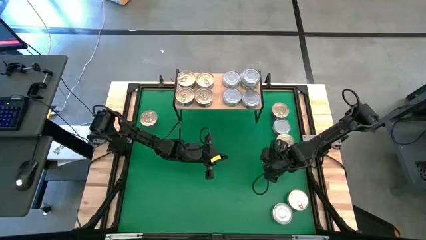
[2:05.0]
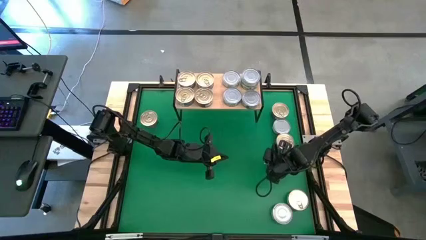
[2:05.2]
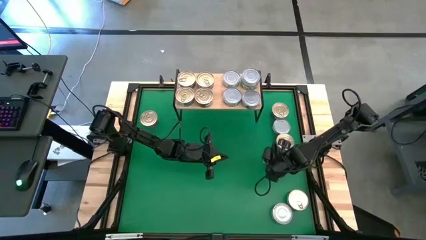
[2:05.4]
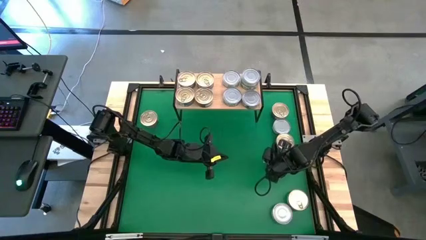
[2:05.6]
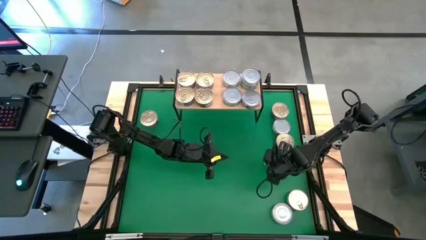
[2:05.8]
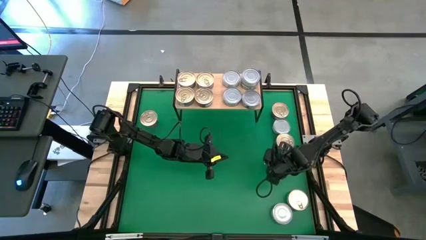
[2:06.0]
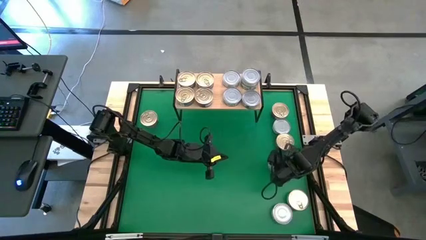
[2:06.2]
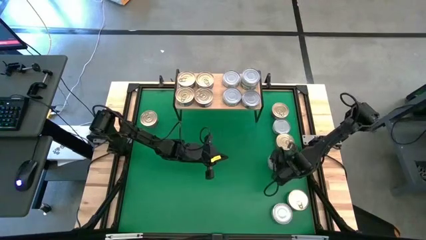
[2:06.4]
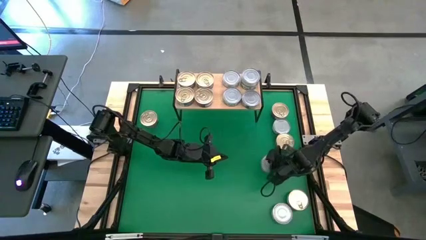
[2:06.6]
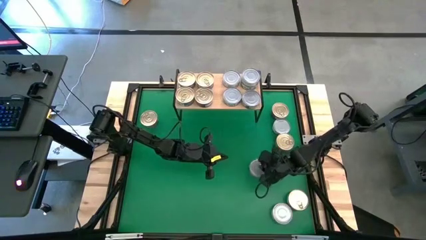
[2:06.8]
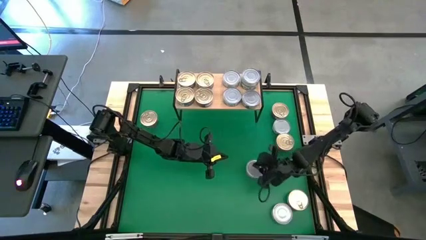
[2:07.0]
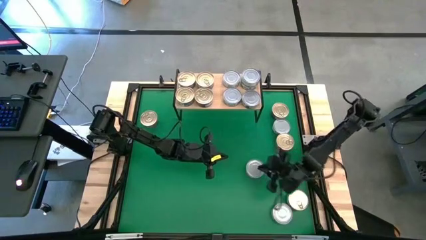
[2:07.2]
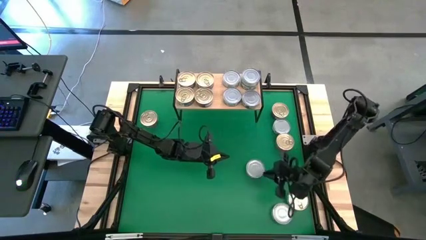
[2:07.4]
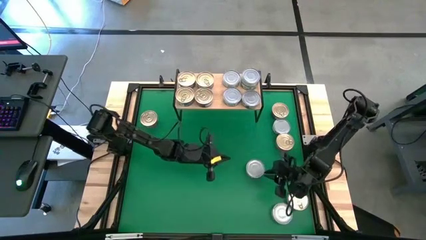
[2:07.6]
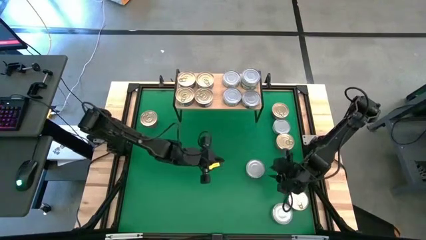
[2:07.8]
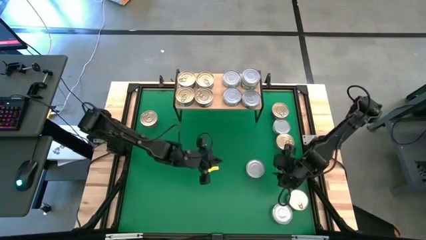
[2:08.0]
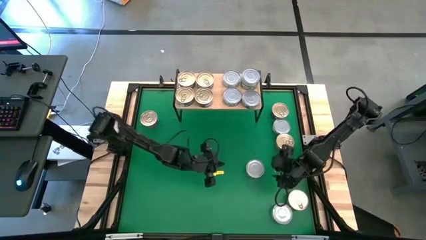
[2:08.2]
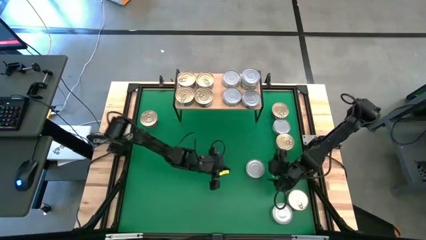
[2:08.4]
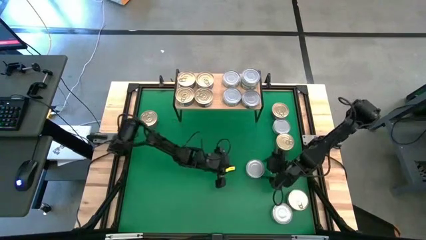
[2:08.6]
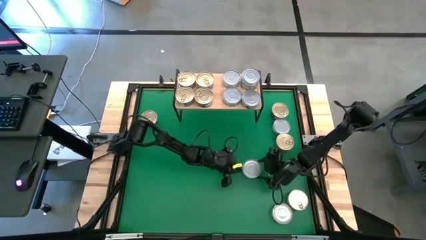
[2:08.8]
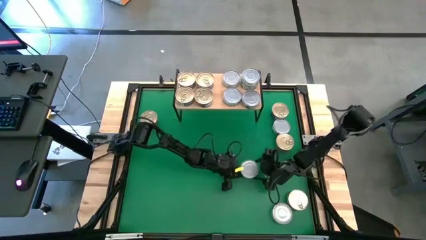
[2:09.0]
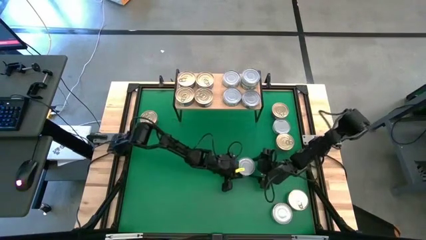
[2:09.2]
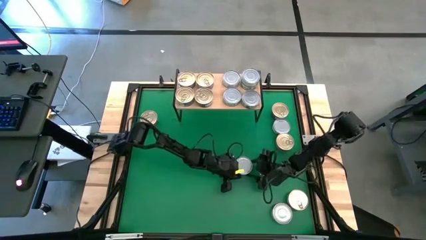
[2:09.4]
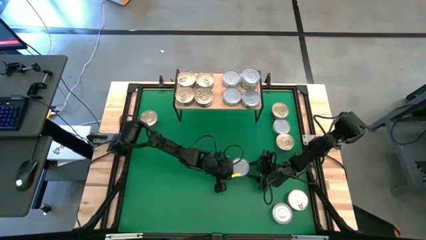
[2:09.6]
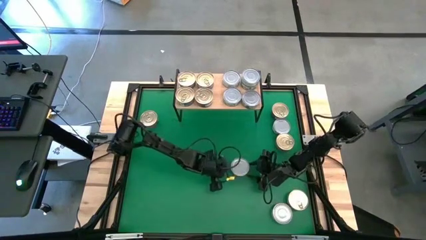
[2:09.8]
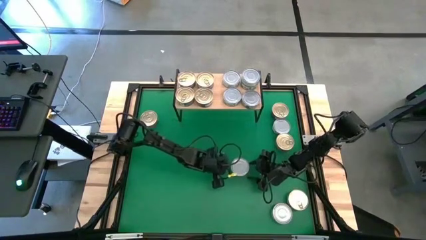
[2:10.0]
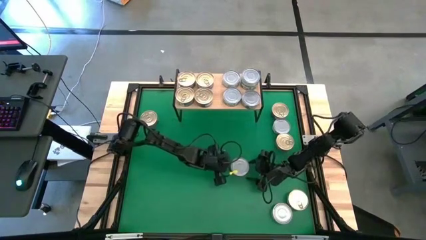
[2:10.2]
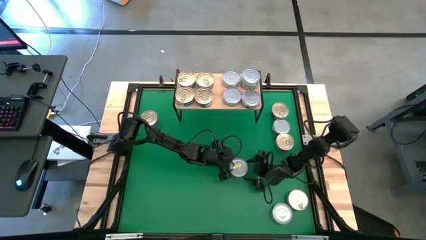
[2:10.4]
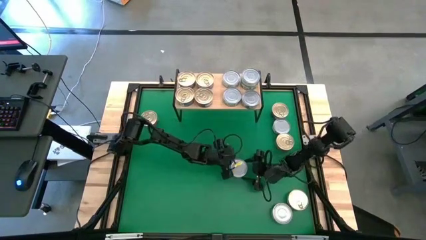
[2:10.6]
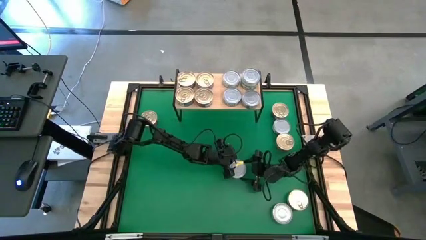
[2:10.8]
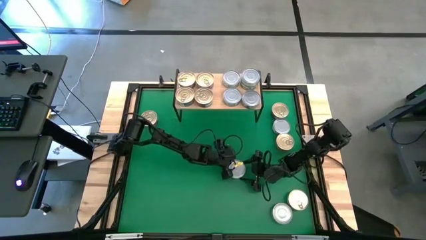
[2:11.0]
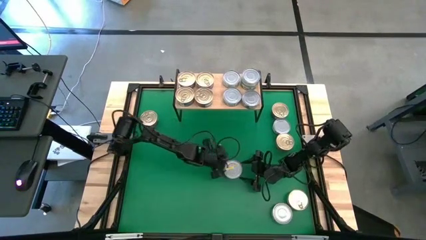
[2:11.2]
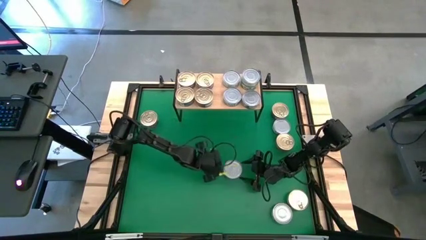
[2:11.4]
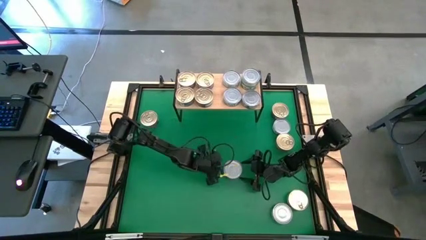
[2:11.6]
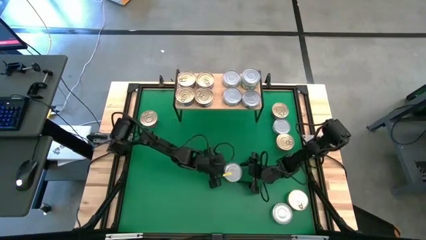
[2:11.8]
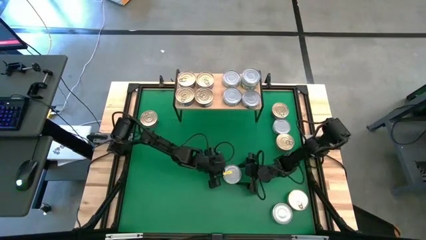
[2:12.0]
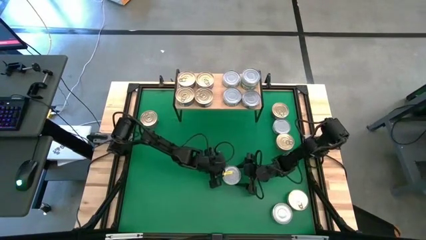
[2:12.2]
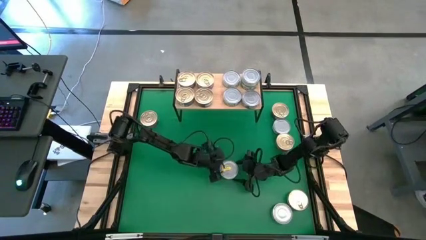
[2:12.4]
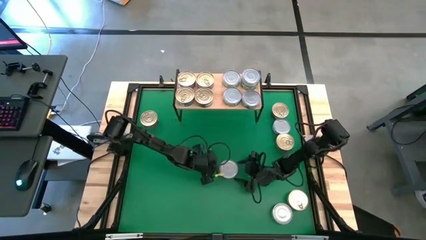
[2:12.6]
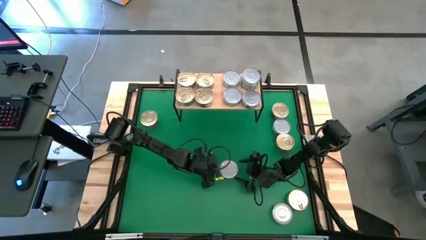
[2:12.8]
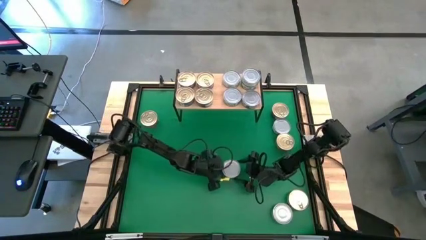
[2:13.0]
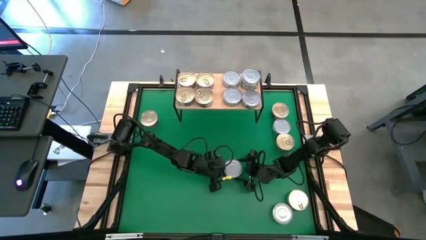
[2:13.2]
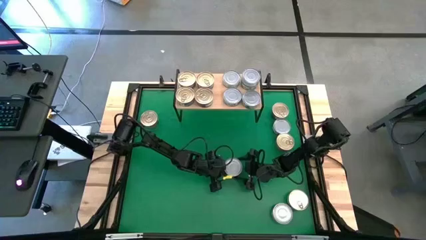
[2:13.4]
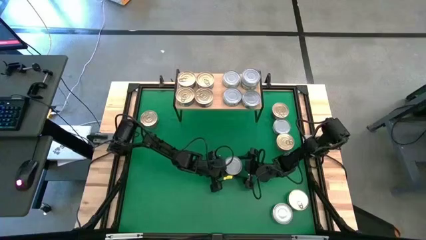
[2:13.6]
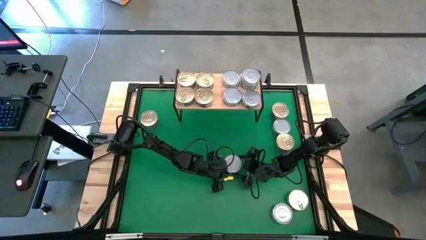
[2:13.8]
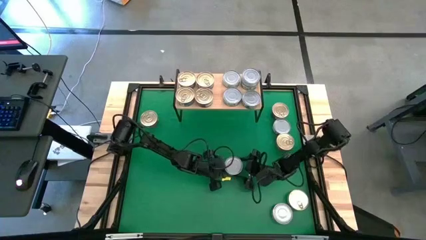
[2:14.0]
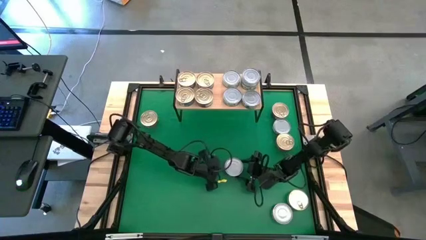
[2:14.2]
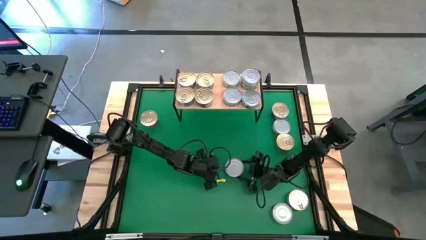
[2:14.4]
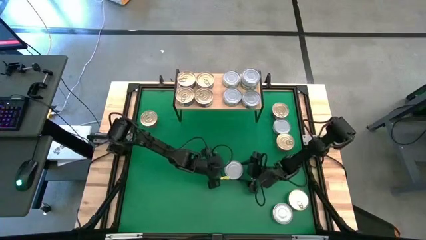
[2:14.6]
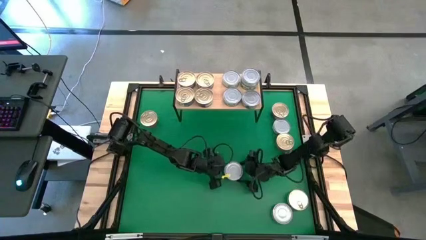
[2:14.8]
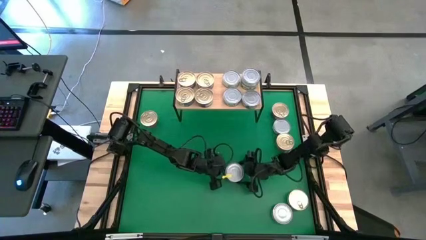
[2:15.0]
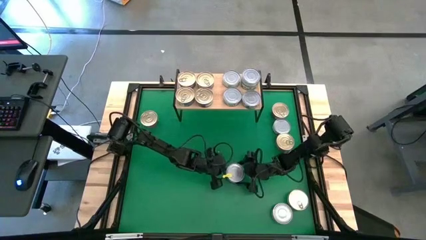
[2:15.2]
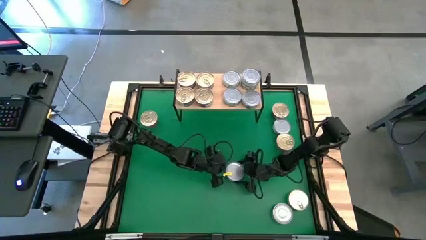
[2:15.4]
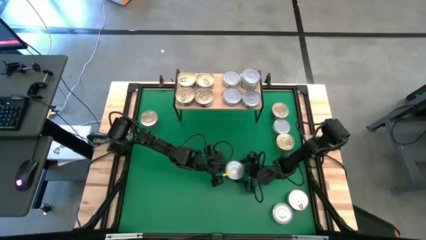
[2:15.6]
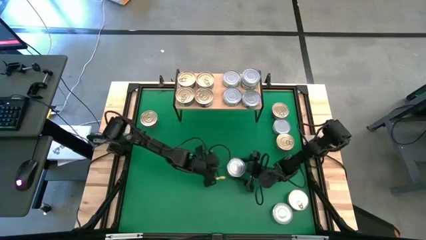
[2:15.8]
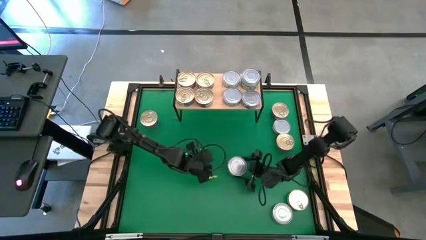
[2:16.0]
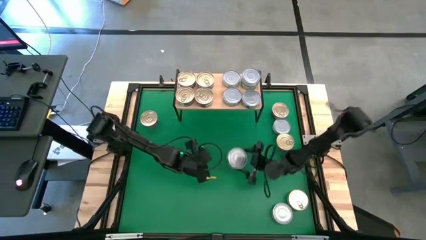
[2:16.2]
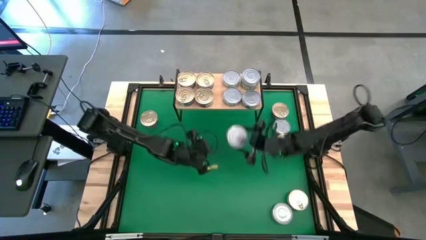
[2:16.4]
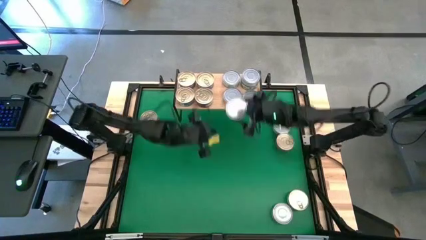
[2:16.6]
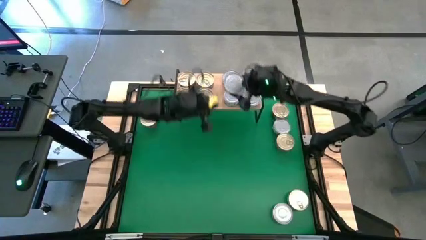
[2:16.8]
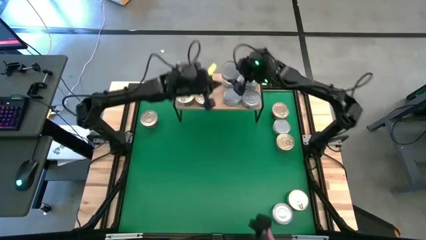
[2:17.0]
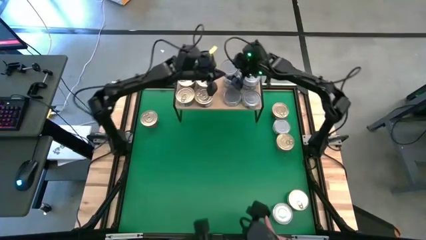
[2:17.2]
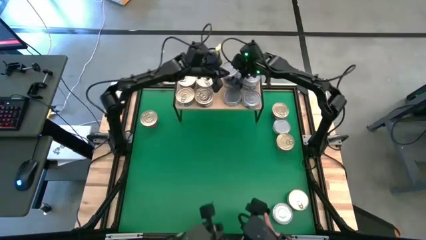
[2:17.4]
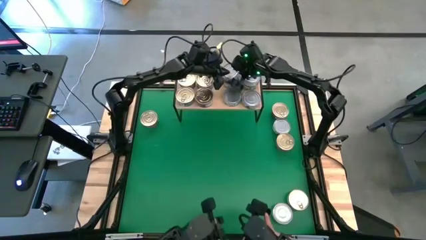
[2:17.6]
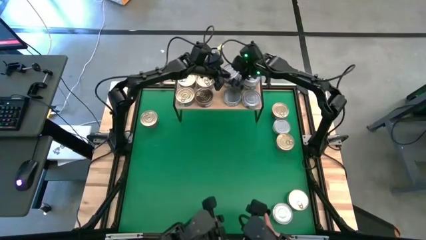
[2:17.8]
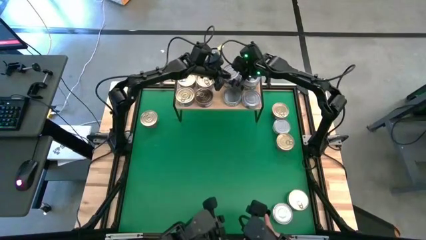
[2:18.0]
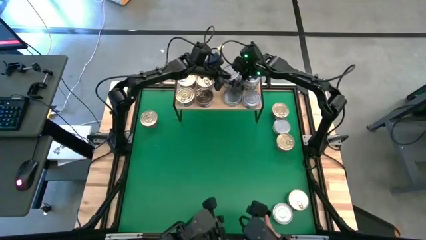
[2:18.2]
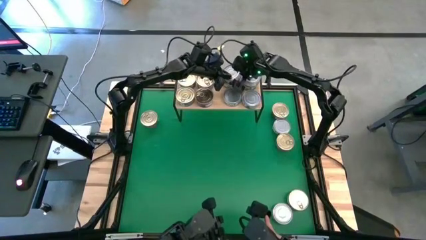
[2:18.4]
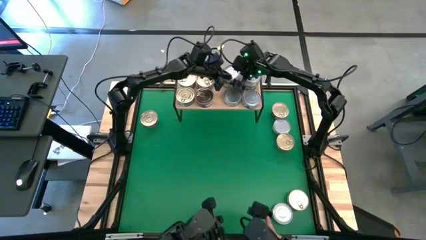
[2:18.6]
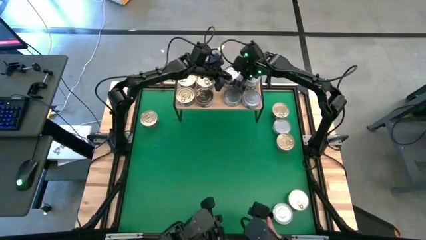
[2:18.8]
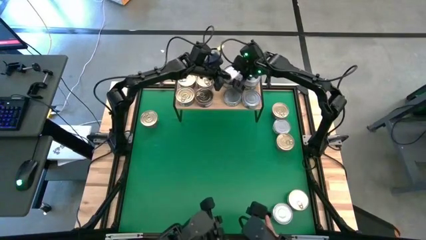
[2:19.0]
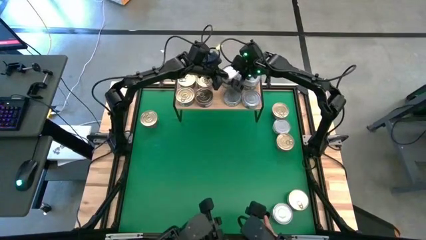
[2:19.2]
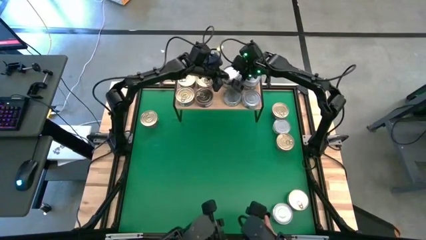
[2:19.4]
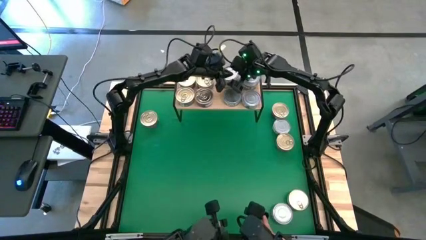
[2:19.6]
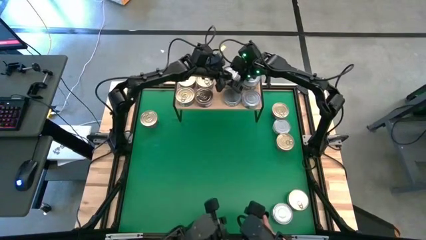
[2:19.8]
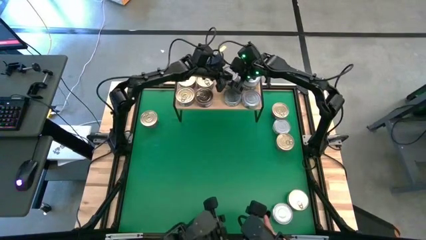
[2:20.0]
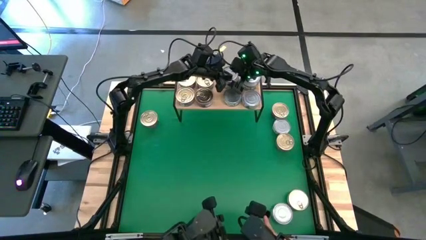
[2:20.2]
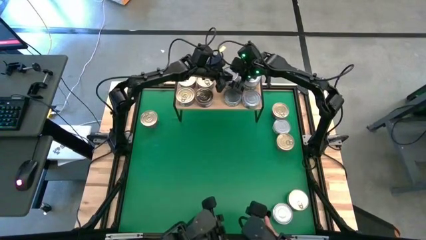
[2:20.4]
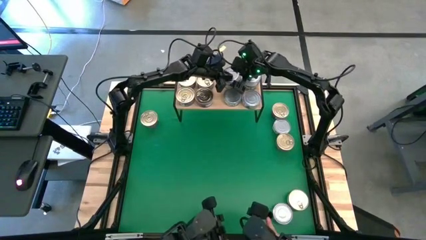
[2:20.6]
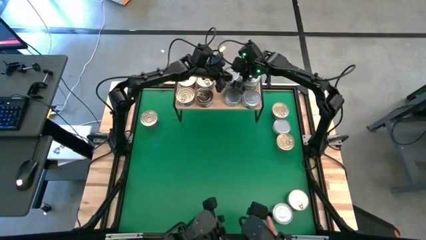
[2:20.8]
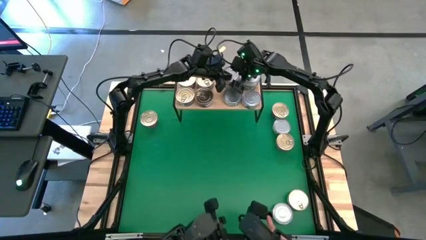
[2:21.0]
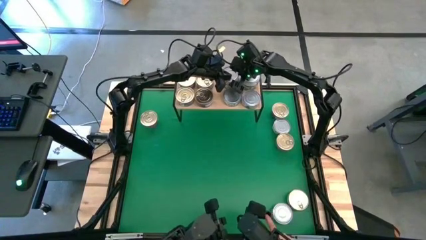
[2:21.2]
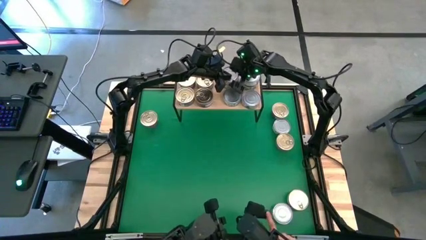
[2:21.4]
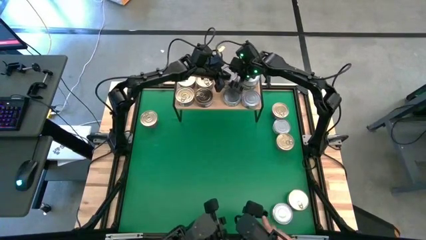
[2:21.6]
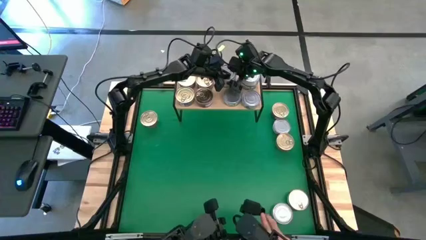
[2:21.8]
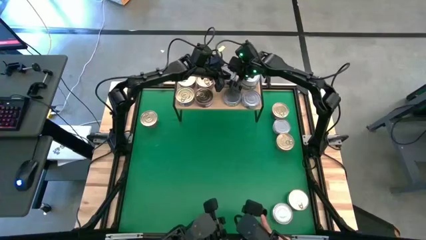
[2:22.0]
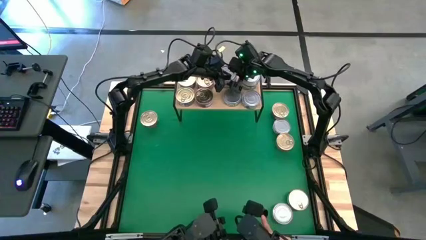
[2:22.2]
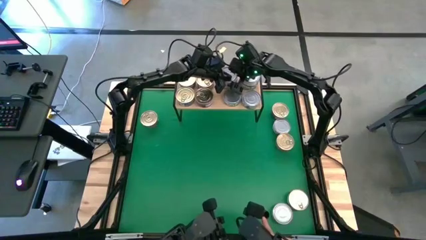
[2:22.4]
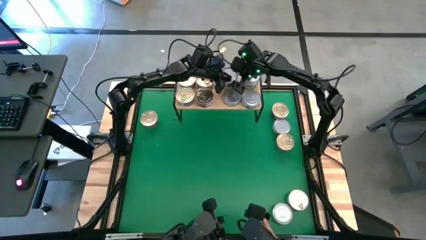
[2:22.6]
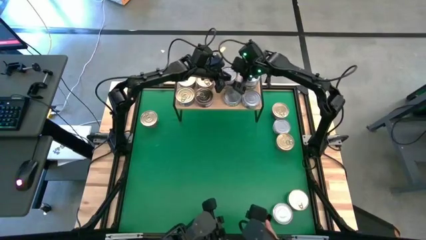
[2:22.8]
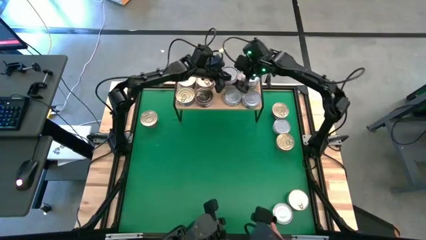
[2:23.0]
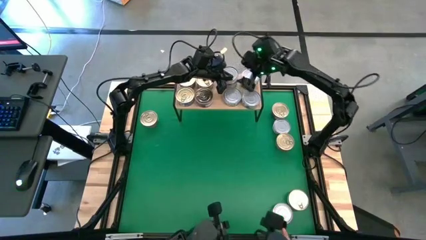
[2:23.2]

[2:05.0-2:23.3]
Task: Stack canned seafood by type on shelf
Stack the green tuna can on top of the other green tuna can on the shelf
